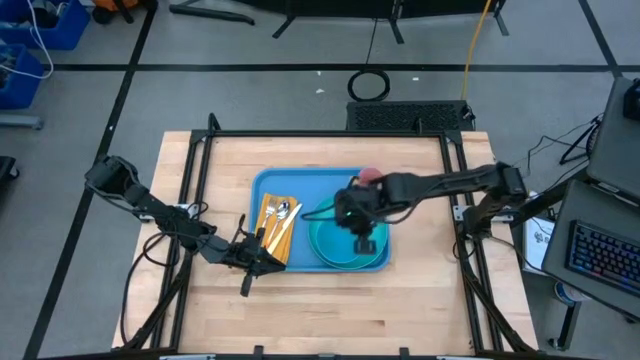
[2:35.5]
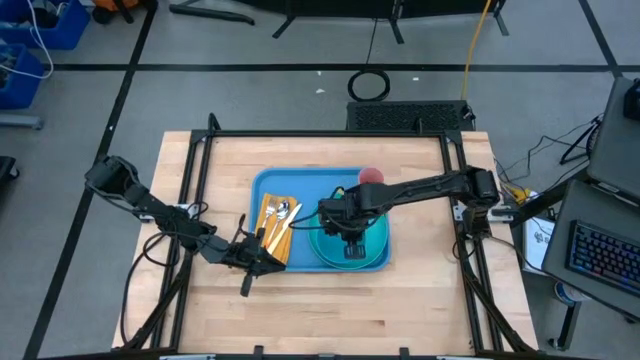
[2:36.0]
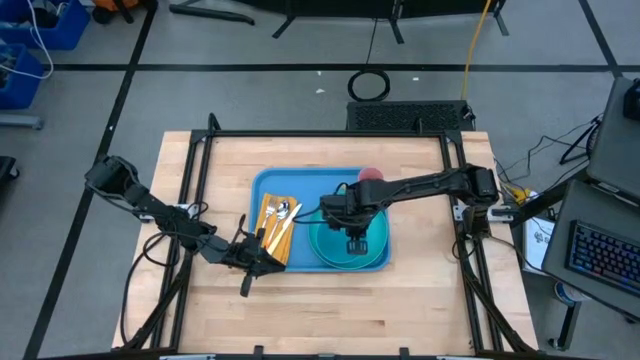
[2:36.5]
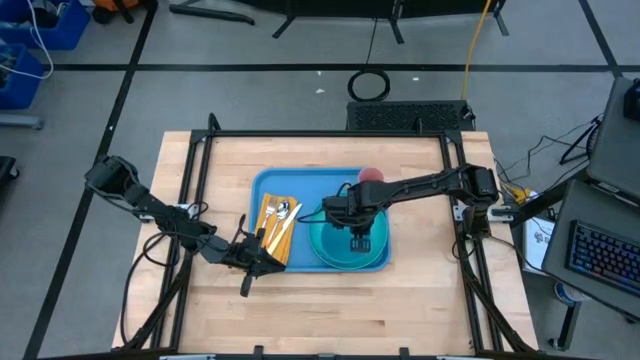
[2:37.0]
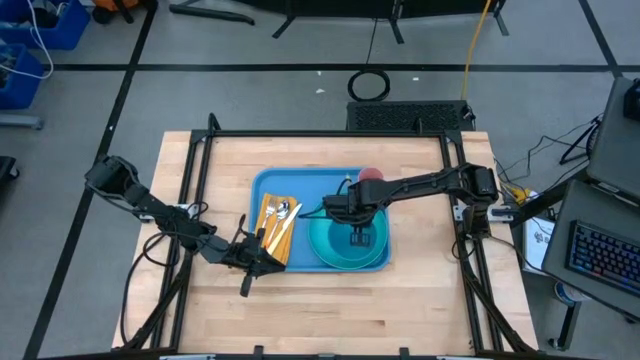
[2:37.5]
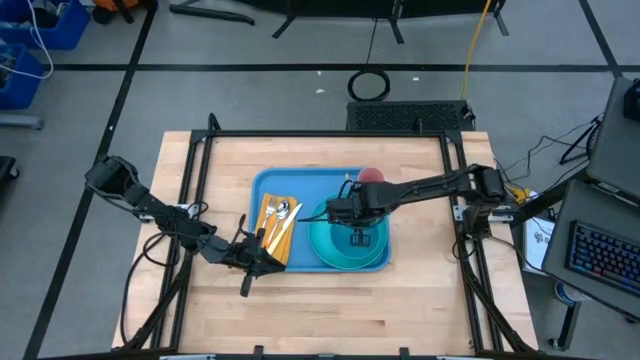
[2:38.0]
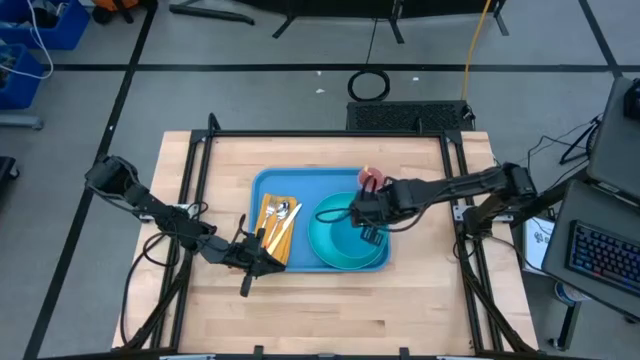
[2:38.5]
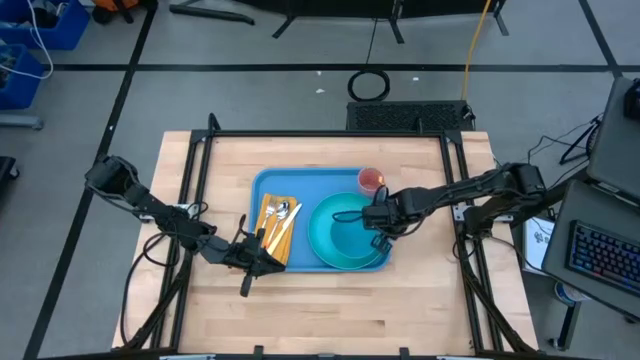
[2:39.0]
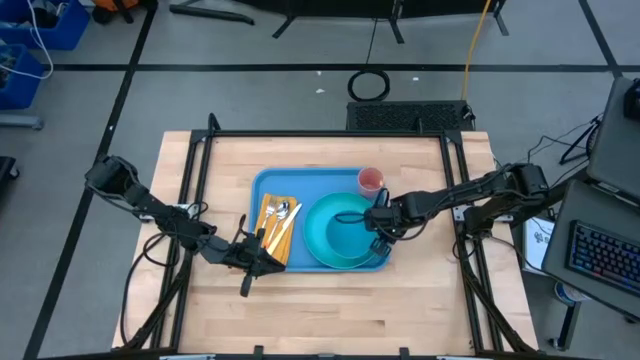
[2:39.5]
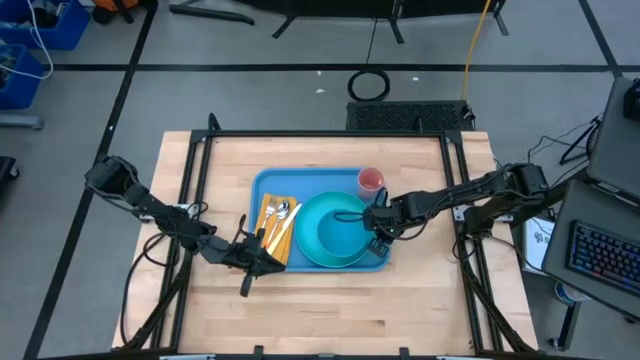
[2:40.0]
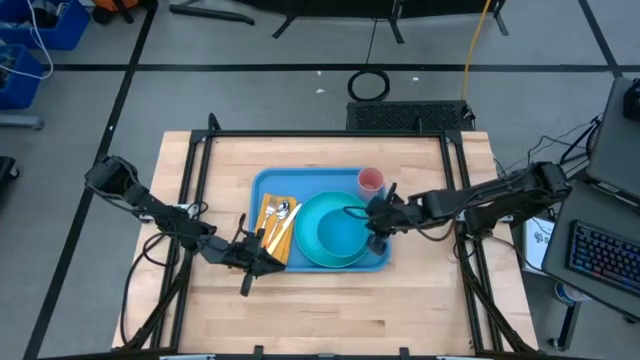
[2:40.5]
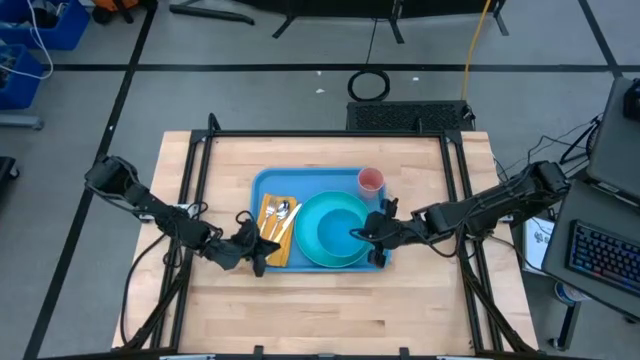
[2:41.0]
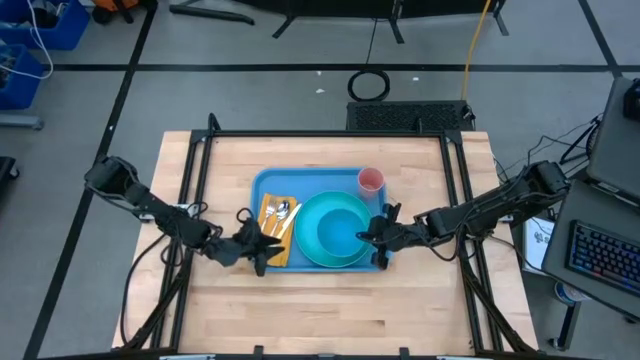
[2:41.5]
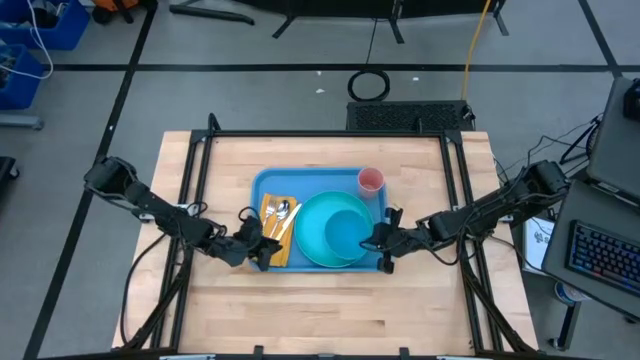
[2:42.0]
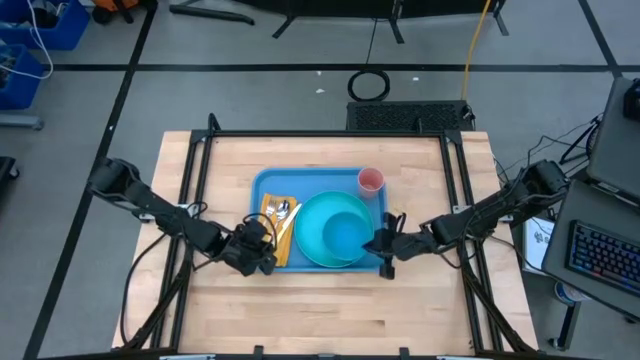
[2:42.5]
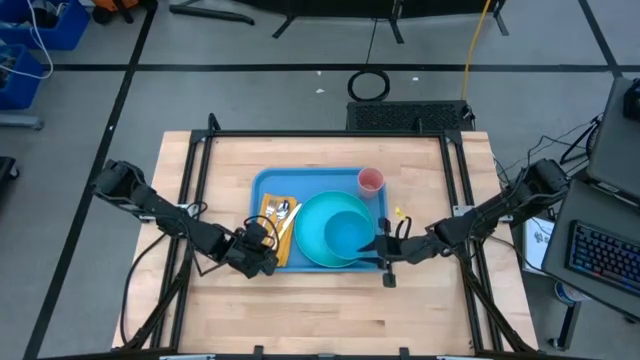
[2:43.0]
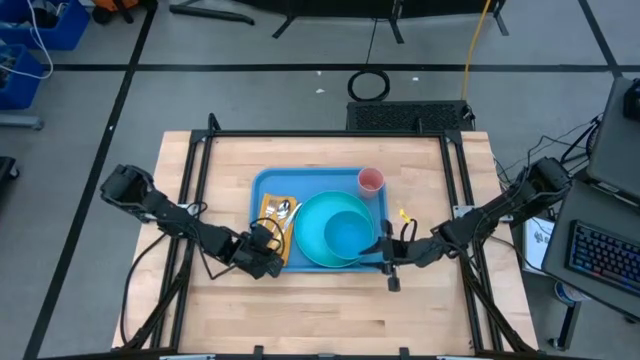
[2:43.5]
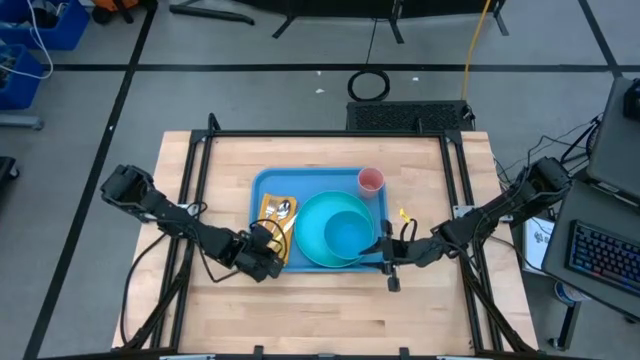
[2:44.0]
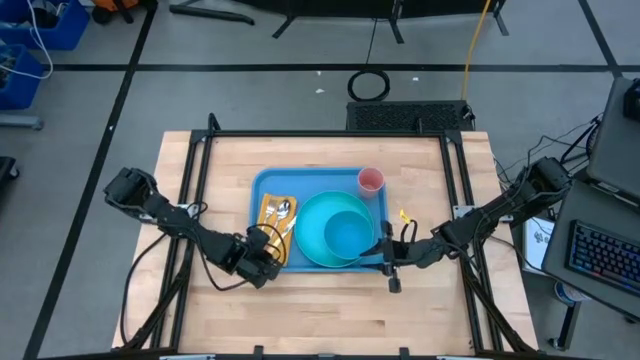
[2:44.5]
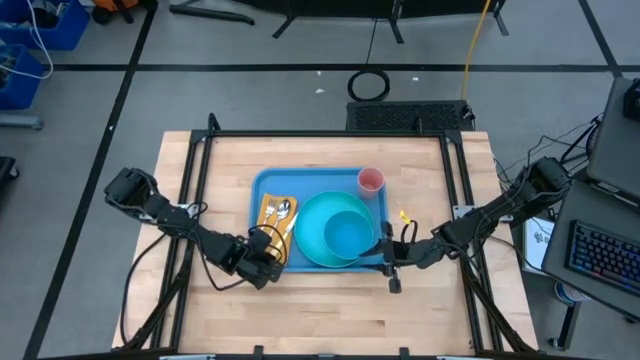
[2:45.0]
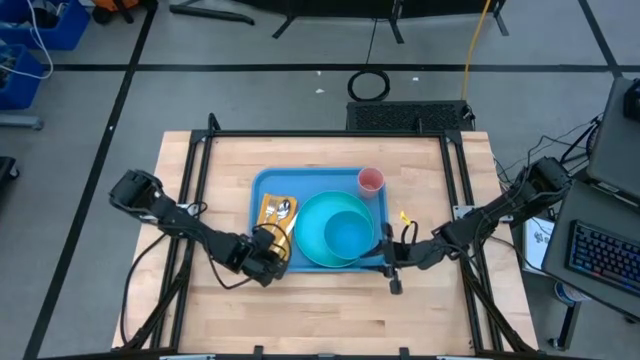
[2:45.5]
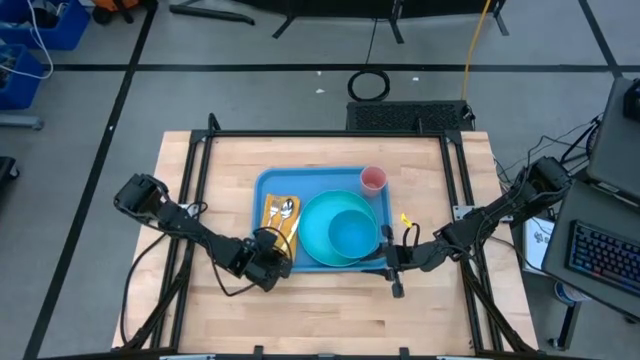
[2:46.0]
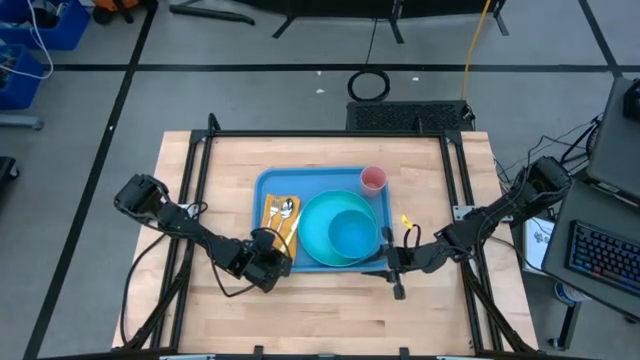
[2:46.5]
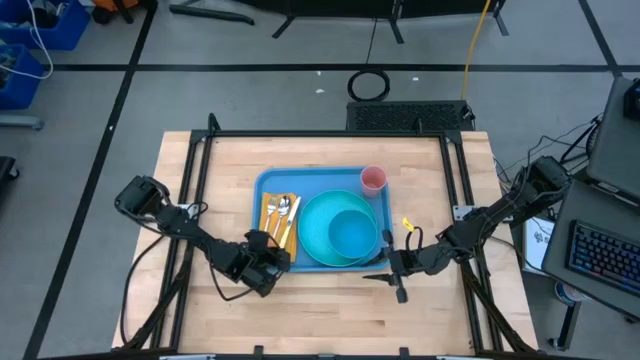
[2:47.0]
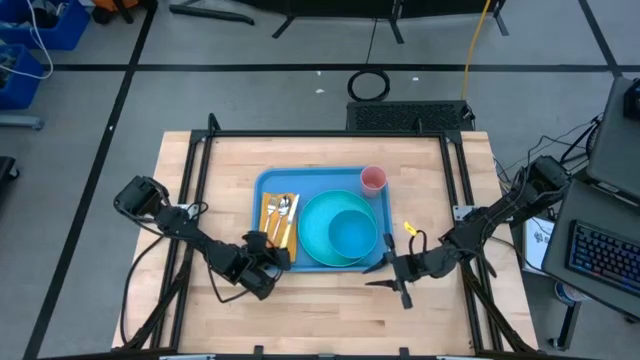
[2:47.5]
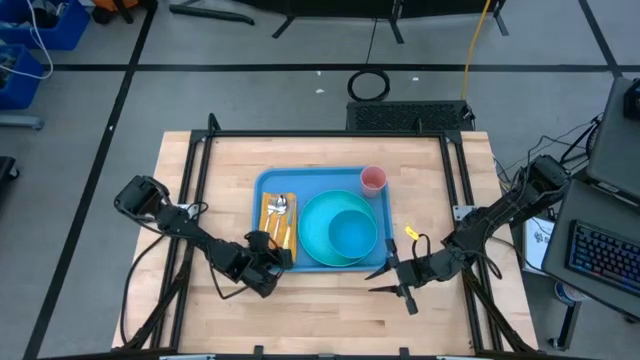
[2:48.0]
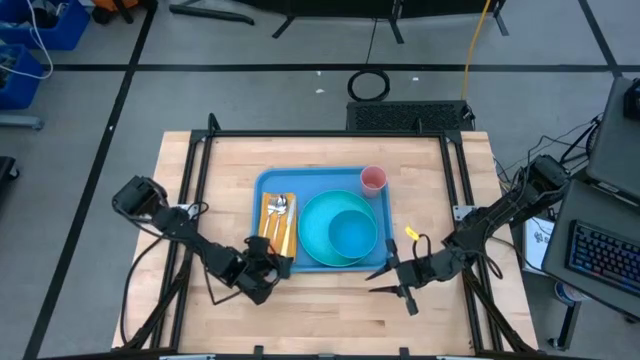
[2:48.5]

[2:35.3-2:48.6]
Task: Set up tray
Adjust the pink cup, blue plate, blue bowl, blue serving tray, and yellow knife

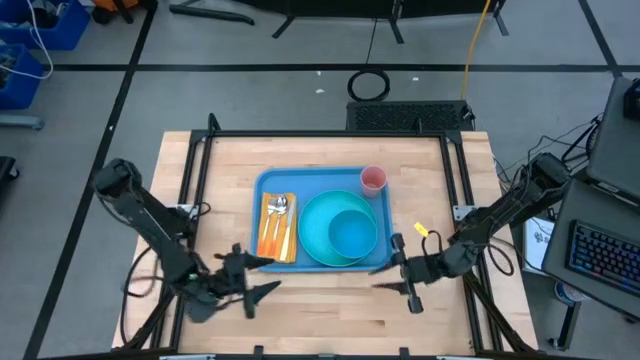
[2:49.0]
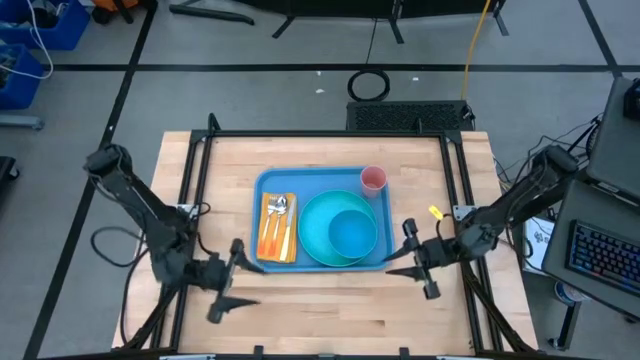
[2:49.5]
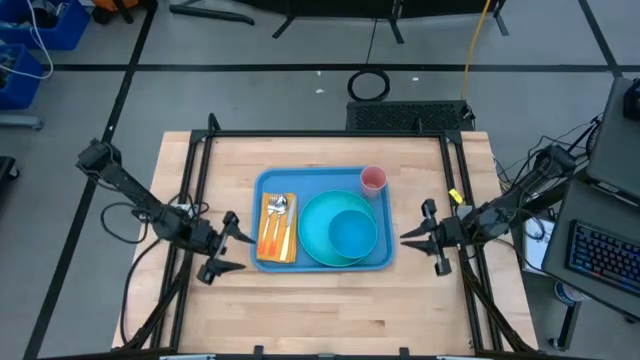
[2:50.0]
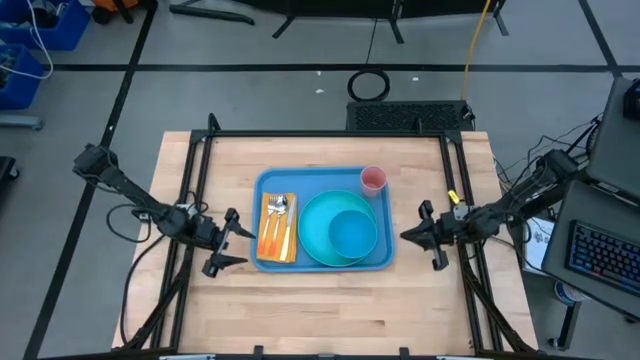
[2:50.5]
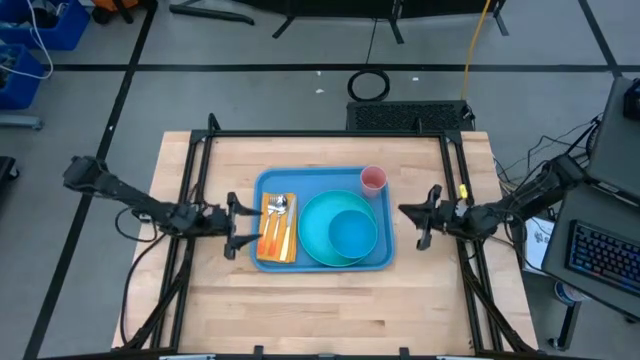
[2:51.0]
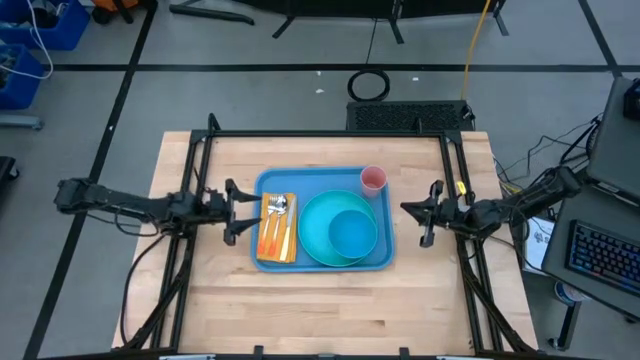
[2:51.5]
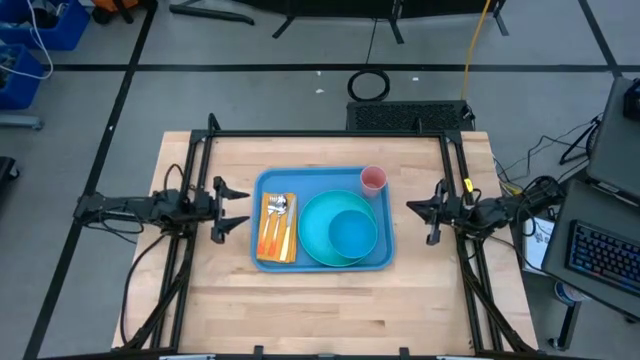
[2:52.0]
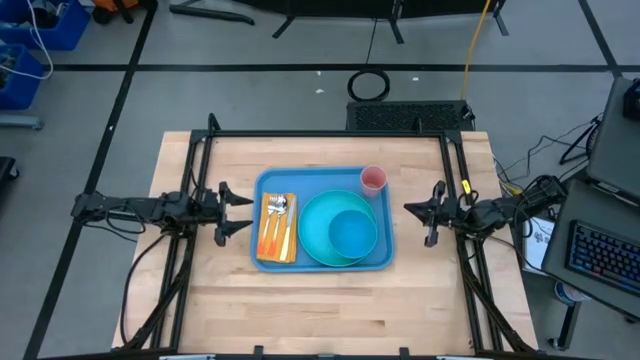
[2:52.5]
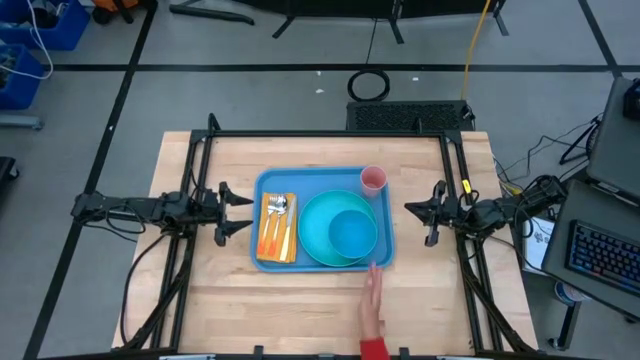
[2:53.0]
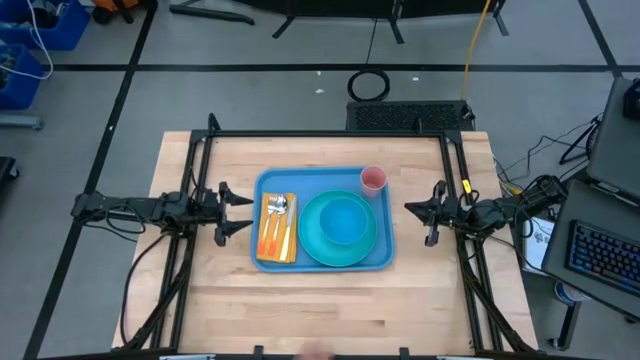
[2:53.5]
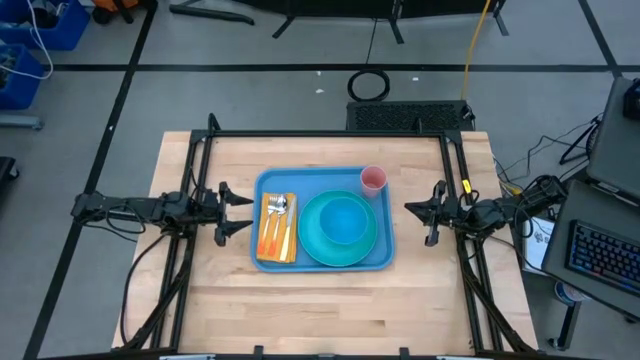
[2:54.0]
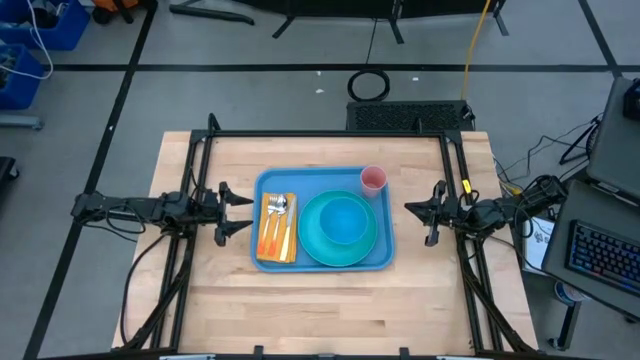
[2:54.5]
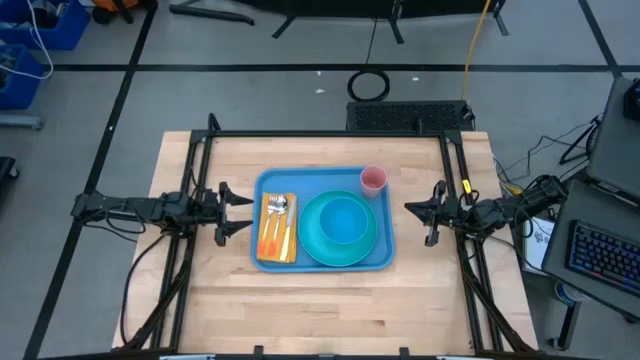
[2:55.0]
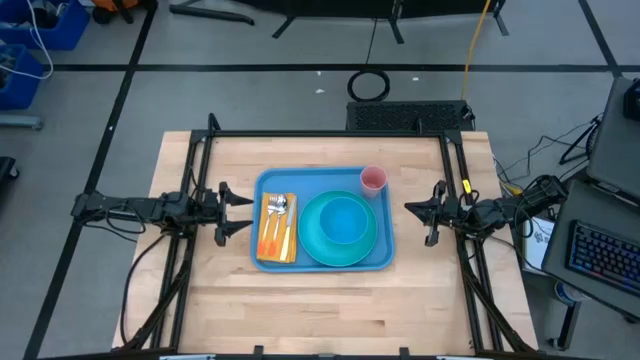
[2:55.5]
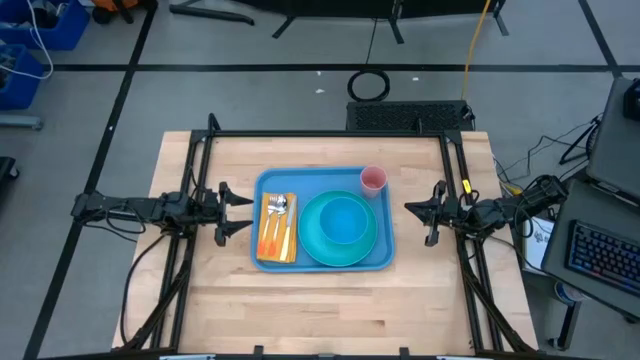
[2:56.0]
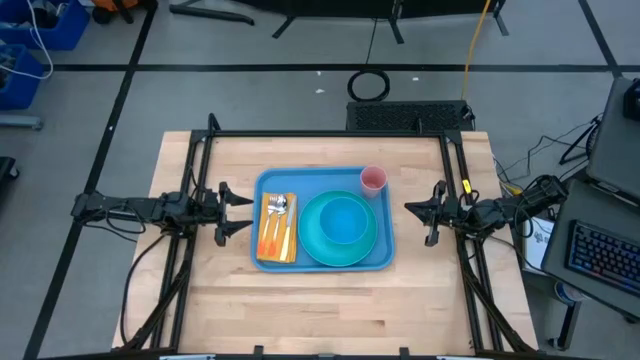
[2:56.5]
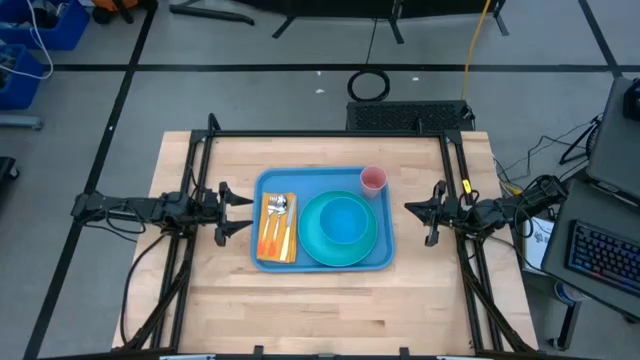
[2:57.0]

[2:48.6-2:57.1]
Return to Home Position
